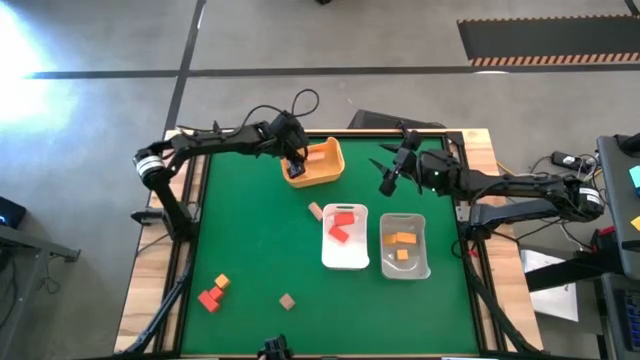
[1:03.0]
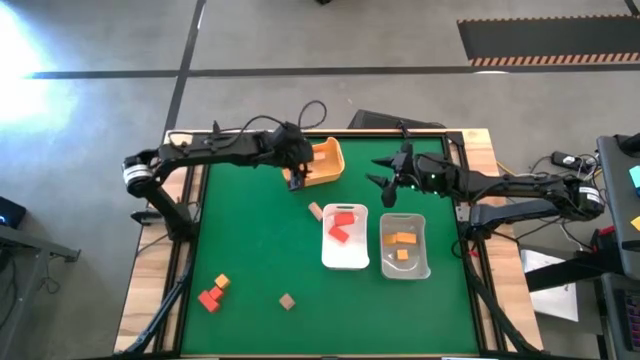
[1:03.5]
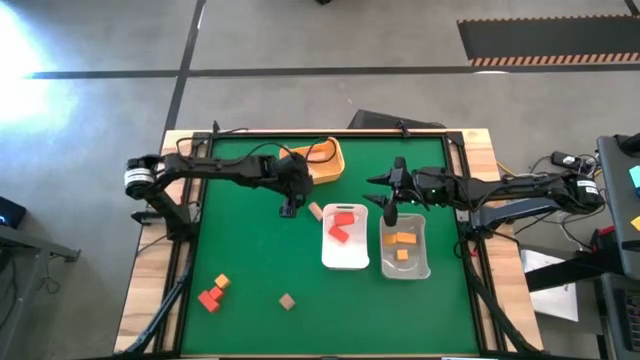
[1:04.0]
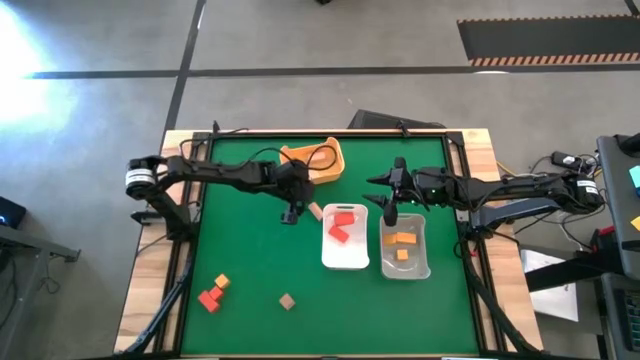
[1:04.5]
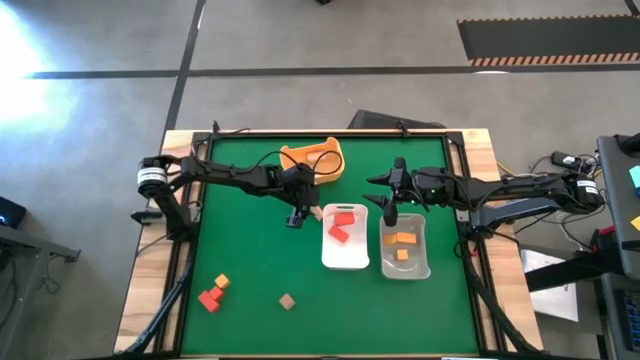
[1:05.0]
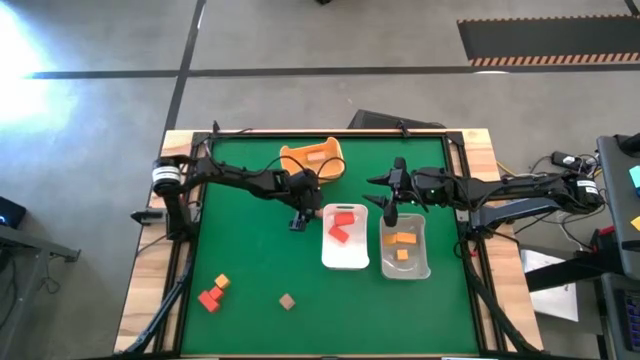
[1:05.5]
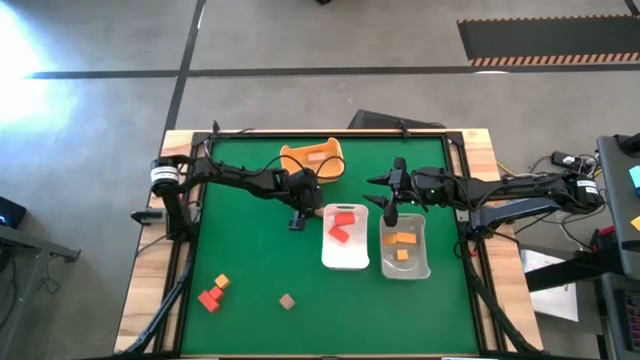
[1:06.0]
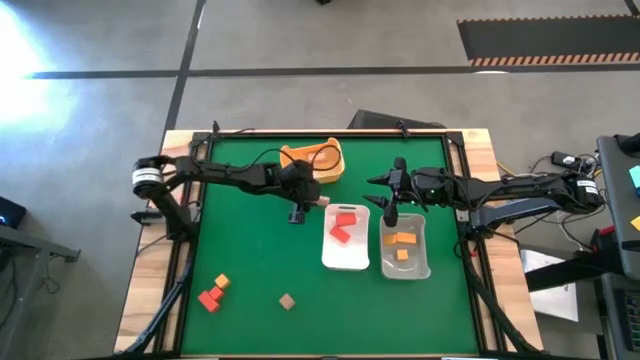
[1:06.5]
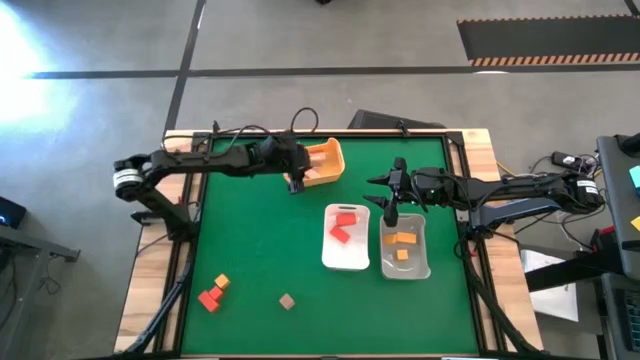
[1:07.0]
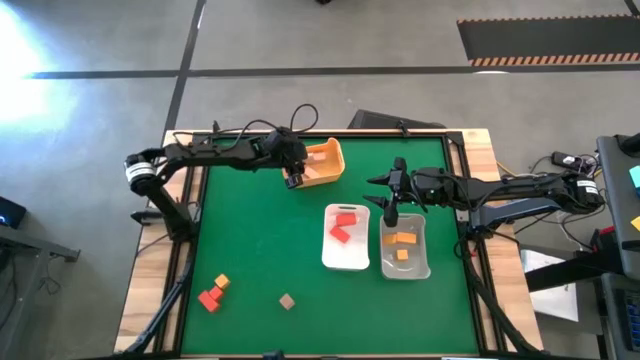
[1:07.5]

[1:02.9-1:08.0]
Task: Sort & place blocks by color
Put the brown block into the yellow bin

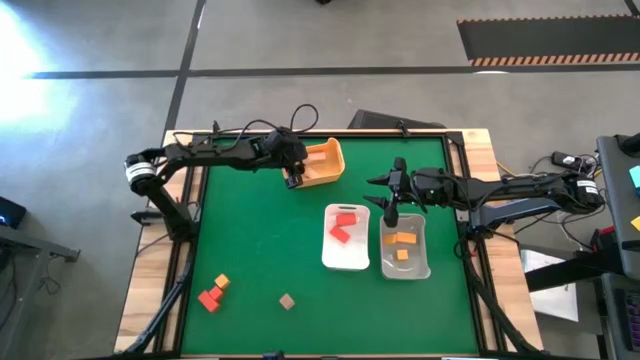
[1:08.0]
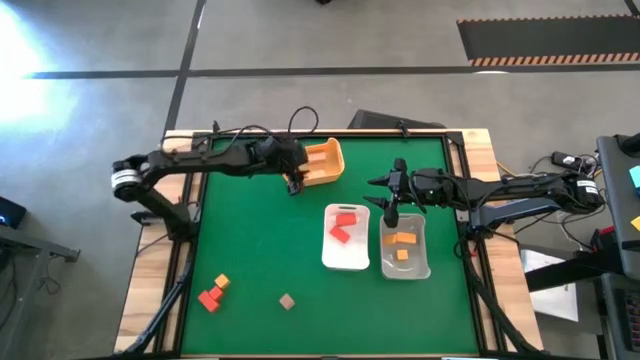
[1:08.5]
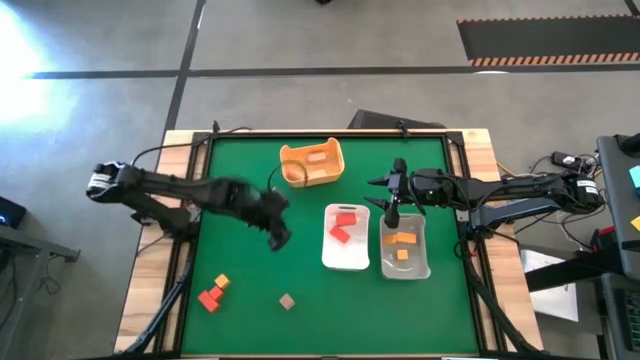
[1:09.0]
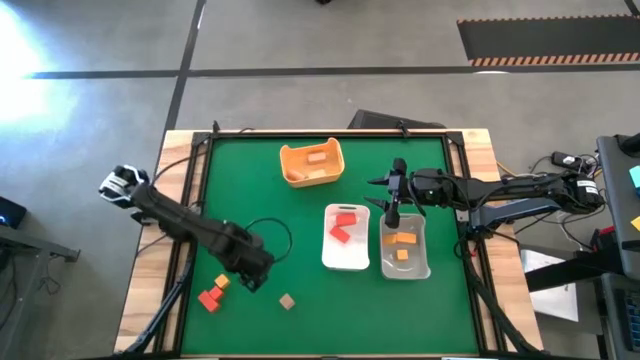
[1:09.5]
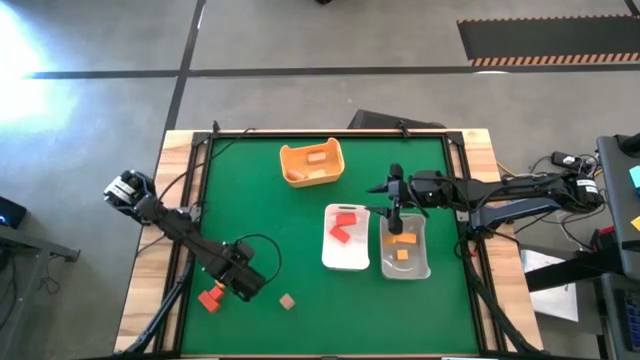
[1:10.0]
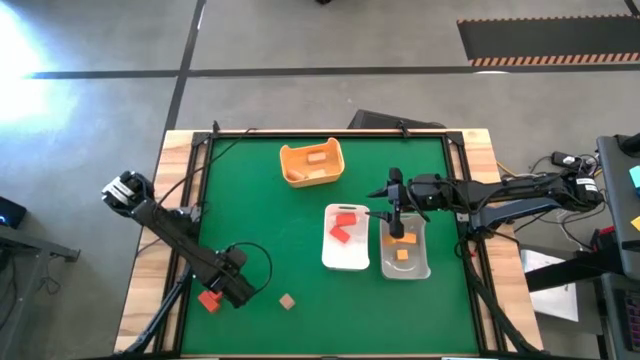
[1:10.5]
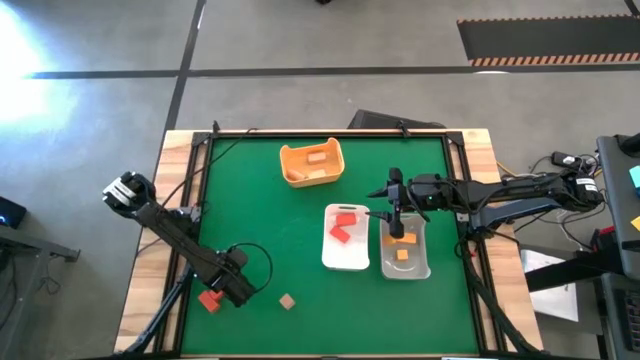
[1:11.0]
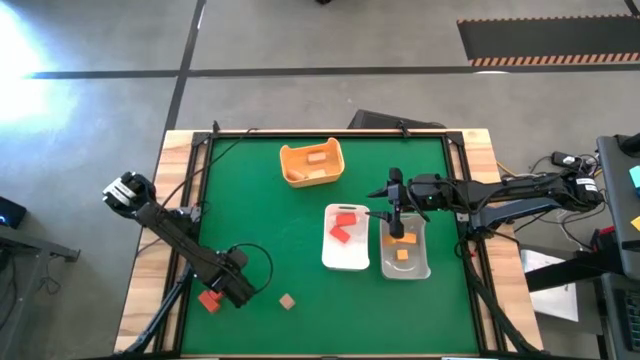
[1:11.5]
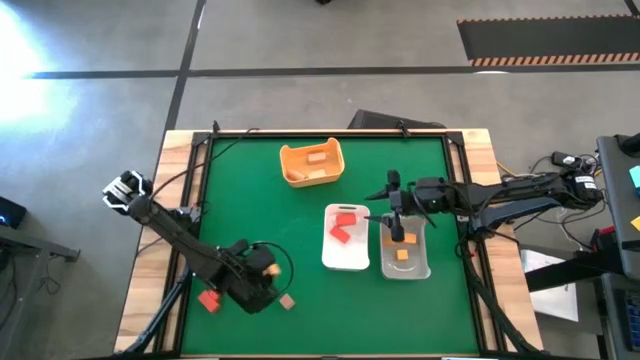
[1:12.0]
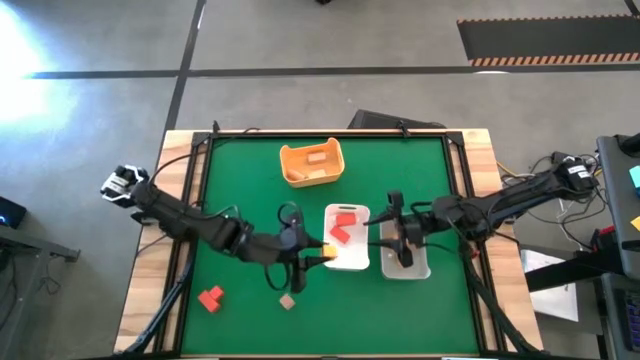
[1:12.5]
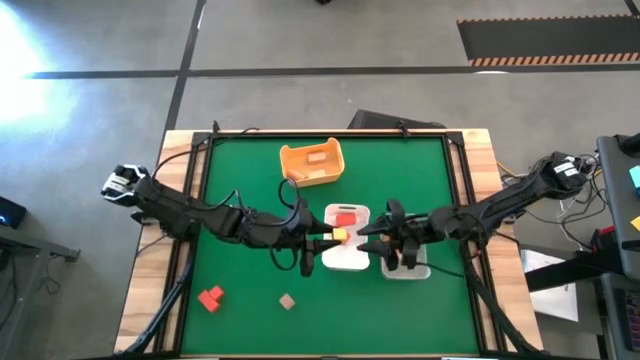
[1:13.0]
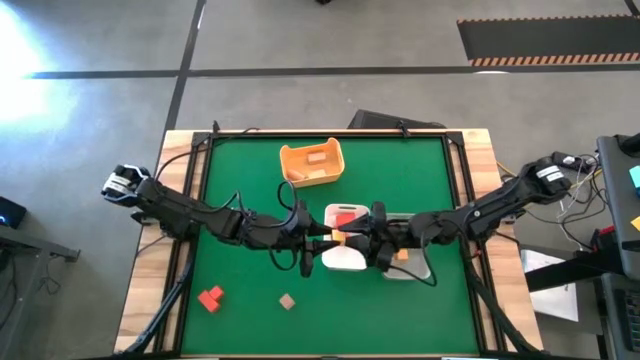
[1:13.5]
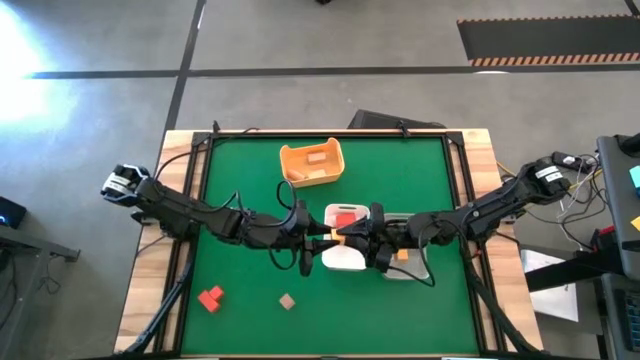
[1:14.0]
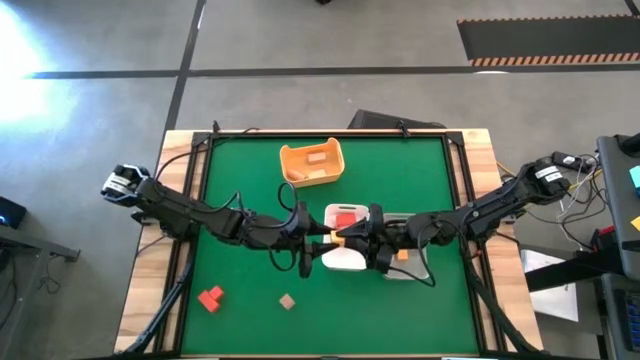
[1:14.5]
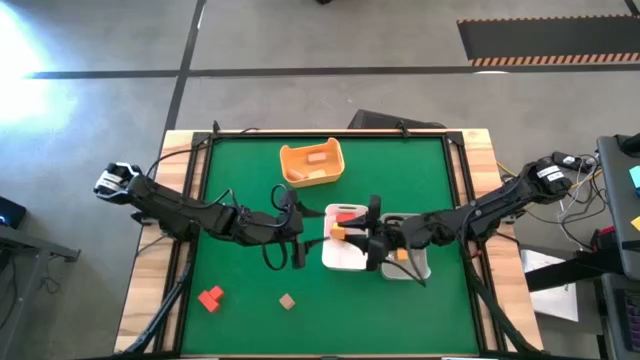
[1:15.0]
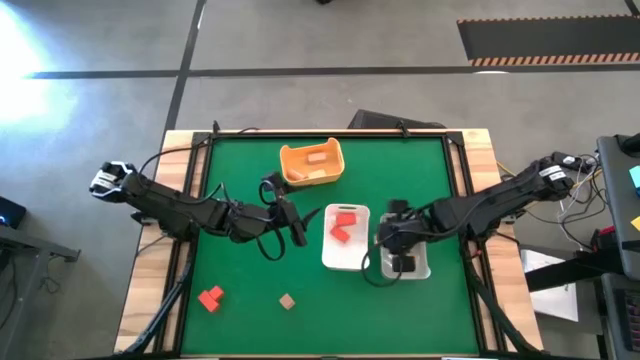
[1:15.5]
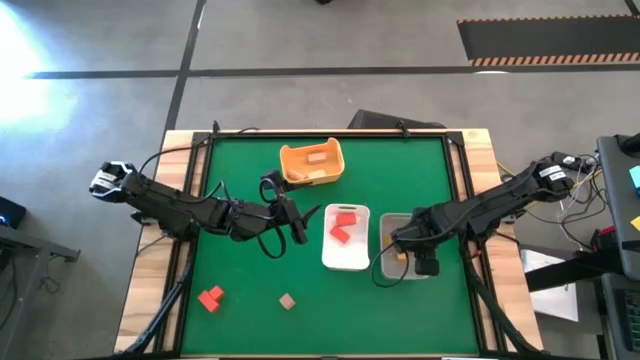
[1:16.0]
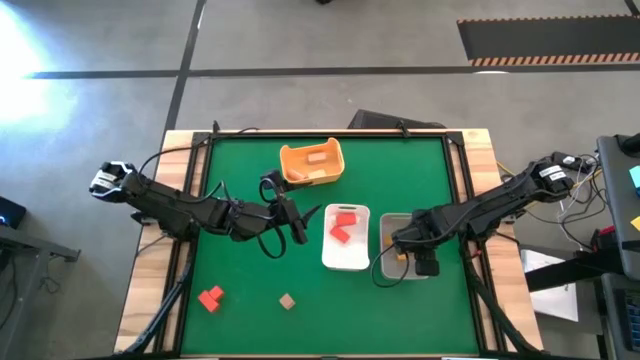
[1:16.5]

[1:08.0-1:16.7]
Put the yellow block into the gray bin

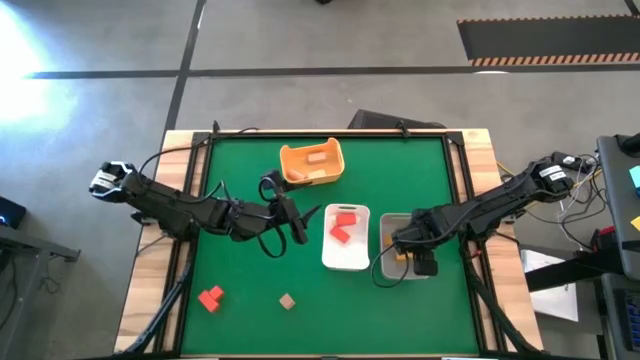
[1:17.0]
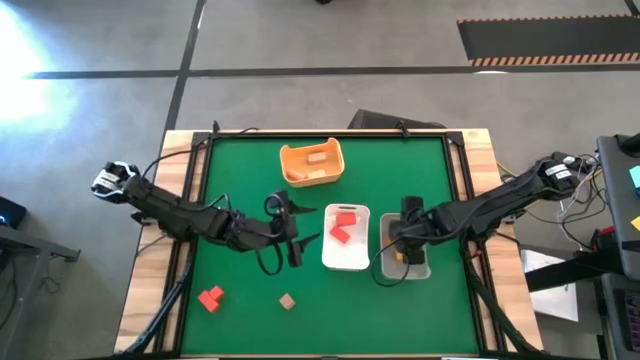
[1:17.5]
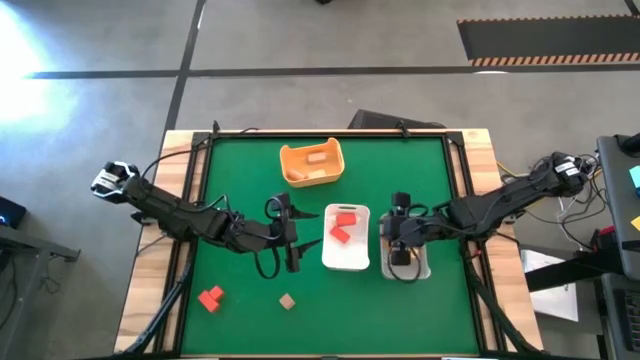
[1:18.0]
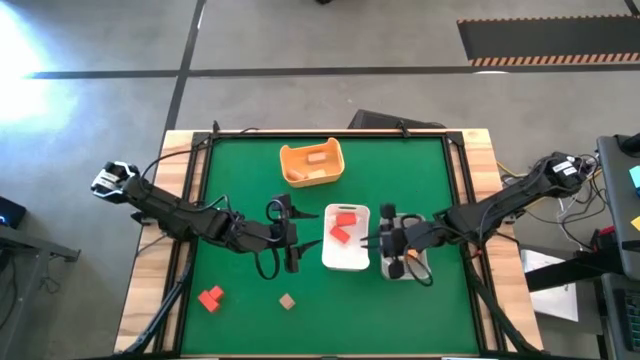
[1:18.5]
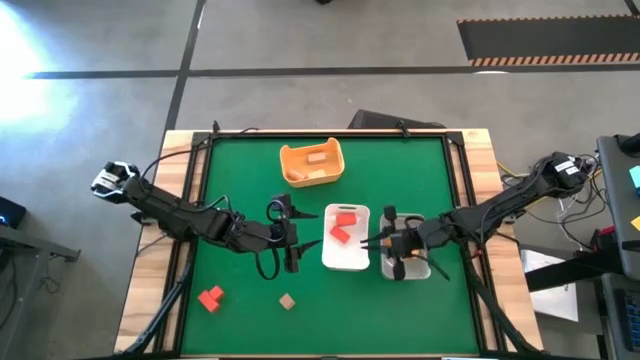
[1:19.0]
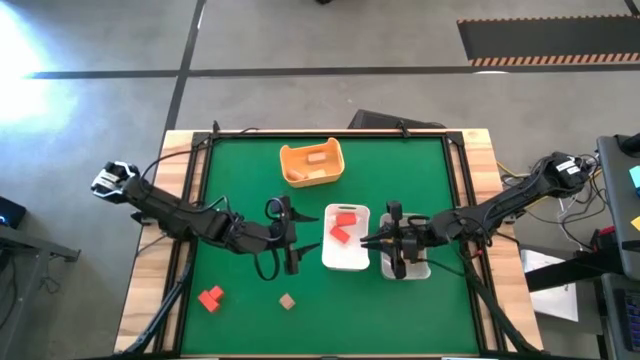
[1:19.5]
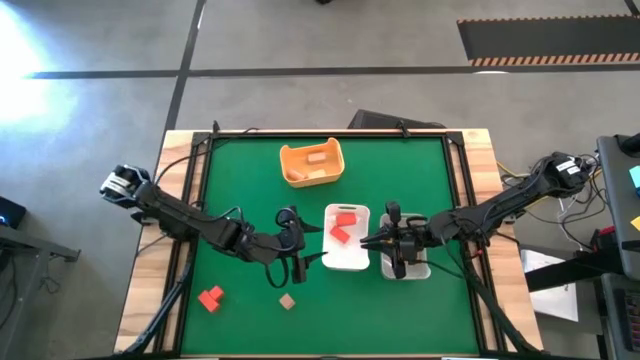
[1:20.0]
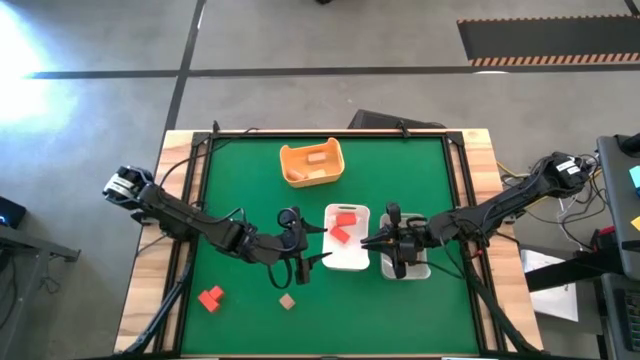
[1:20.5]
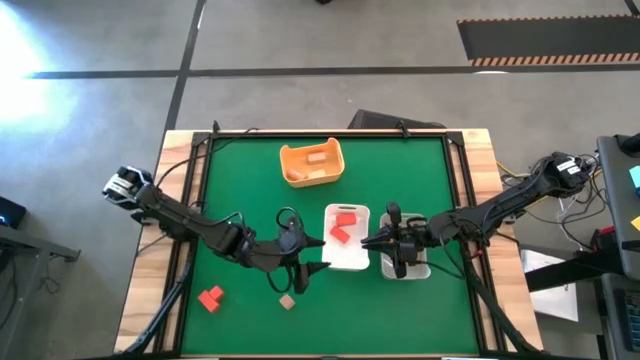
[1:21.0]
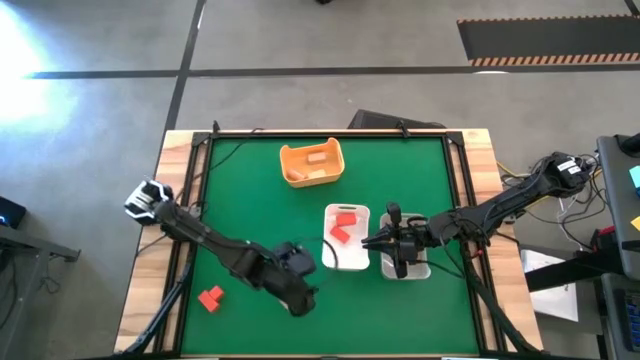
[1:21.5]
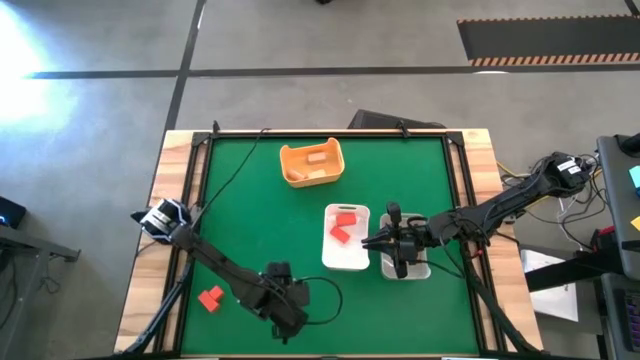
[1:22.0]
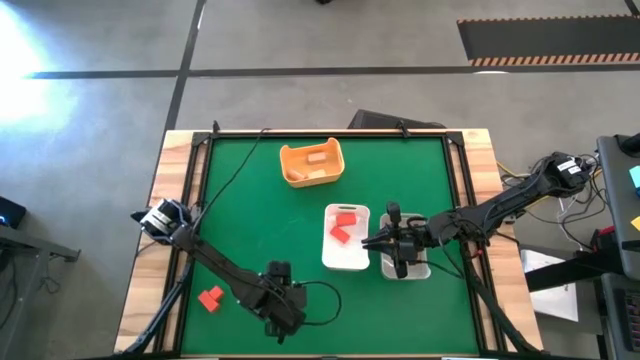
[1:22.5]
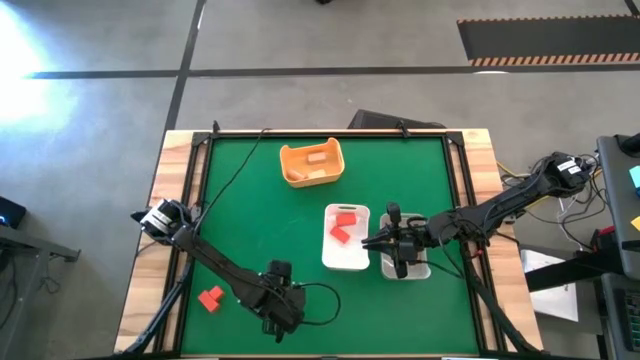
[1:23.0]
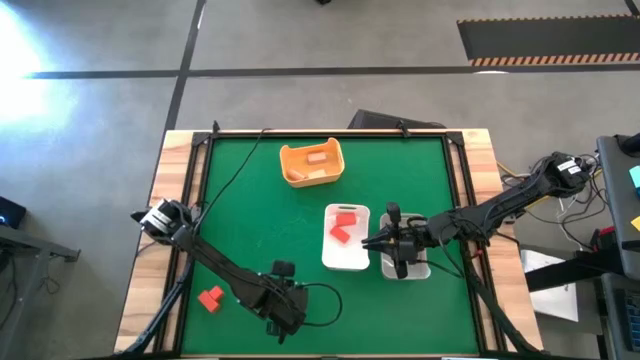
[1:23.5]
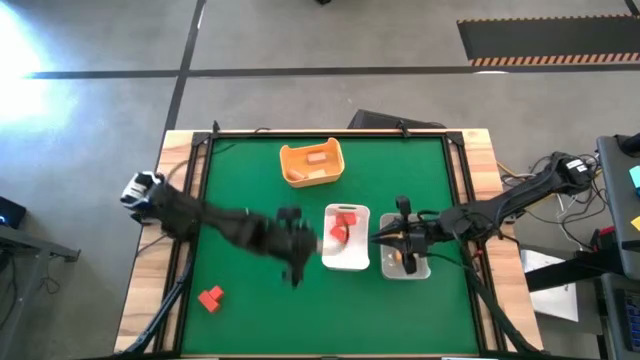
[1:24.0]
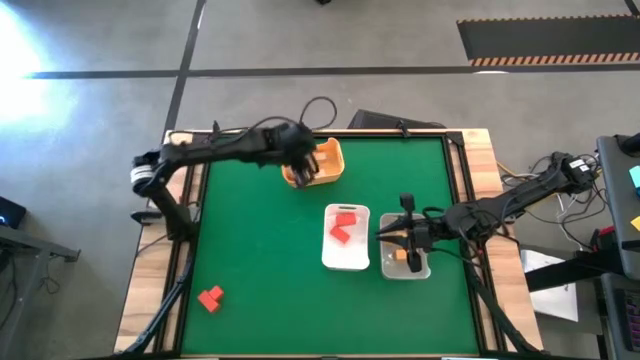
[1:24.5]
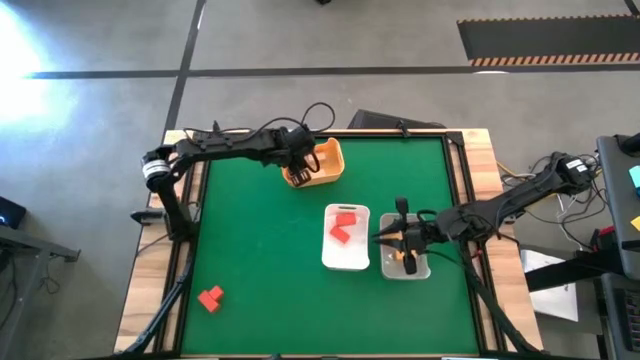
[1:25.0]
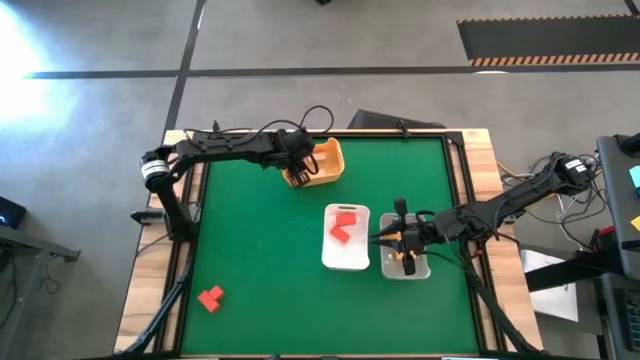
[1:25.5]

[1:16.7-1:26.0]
Put the brown block into the yellow bin
